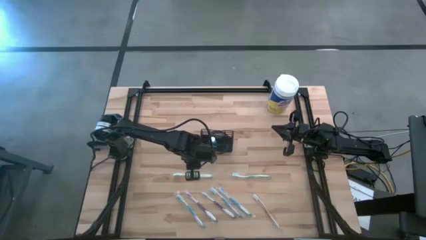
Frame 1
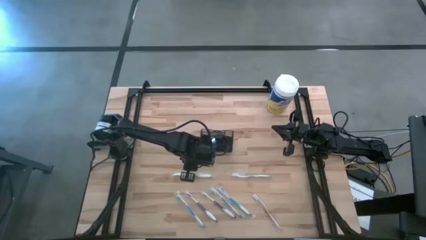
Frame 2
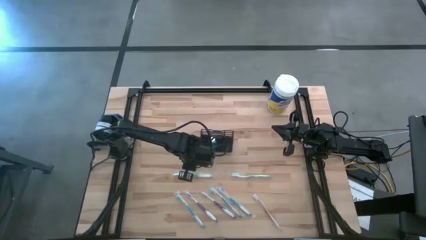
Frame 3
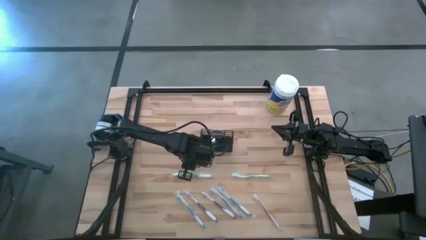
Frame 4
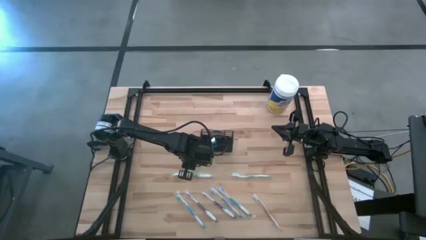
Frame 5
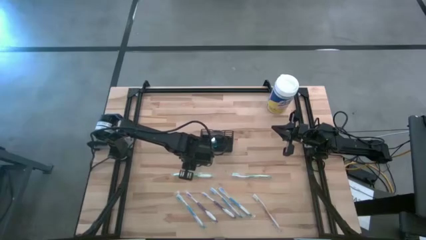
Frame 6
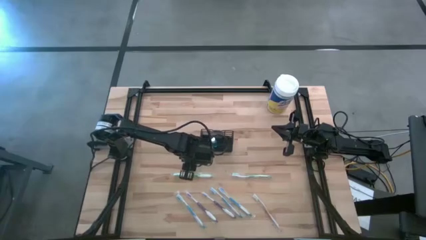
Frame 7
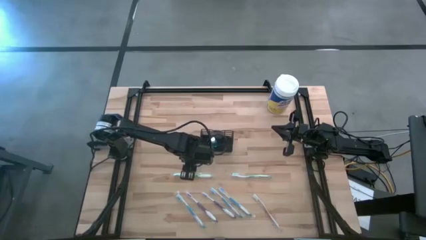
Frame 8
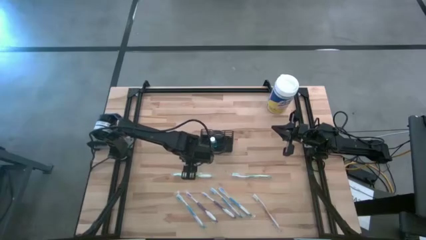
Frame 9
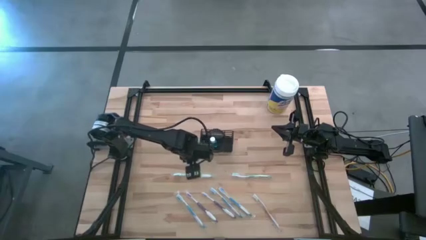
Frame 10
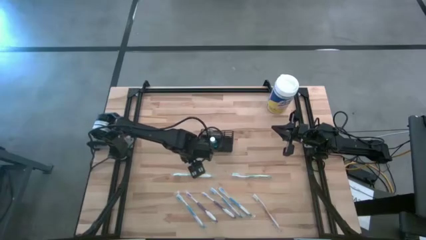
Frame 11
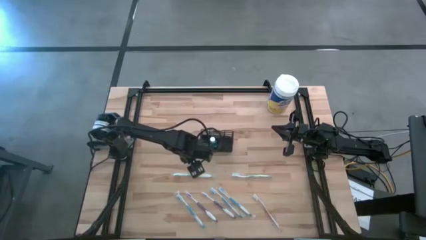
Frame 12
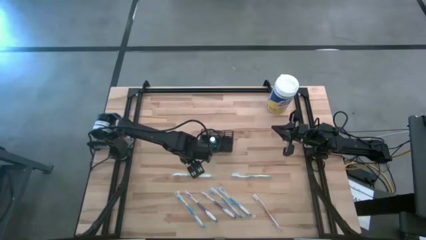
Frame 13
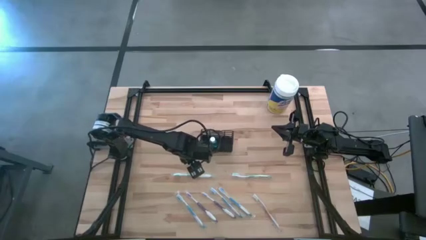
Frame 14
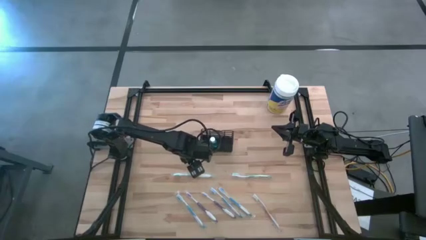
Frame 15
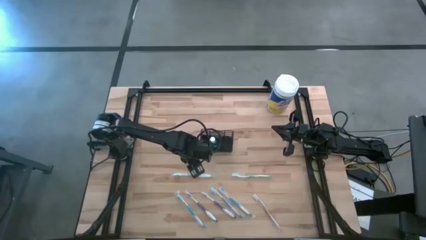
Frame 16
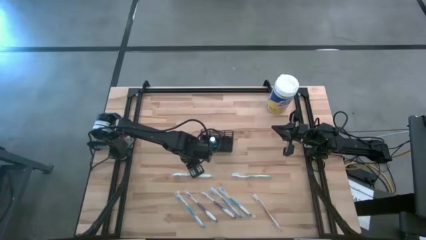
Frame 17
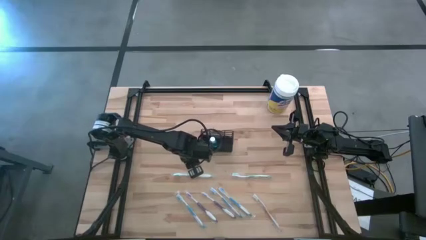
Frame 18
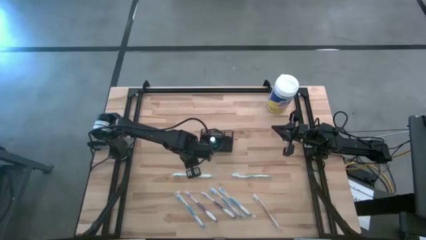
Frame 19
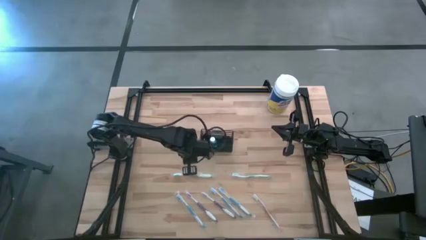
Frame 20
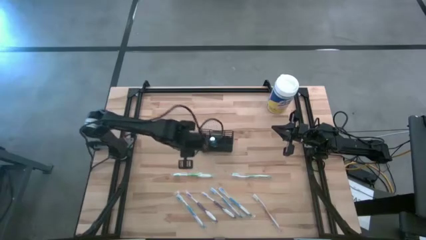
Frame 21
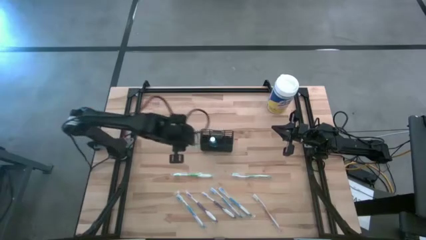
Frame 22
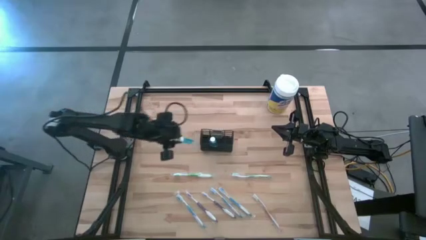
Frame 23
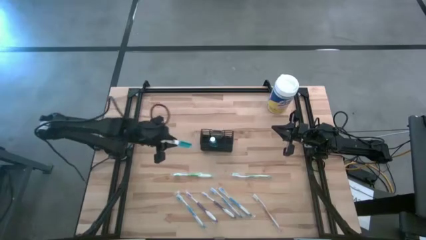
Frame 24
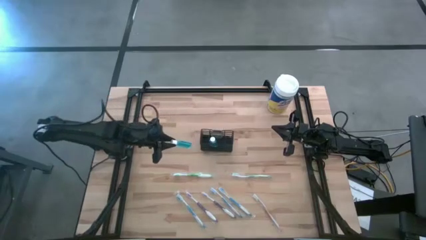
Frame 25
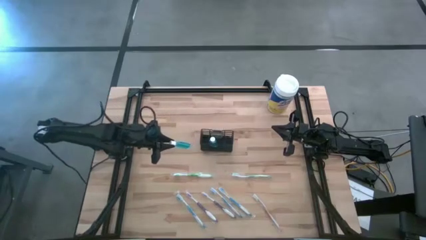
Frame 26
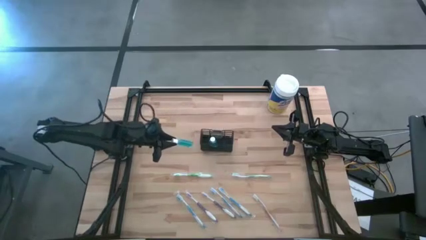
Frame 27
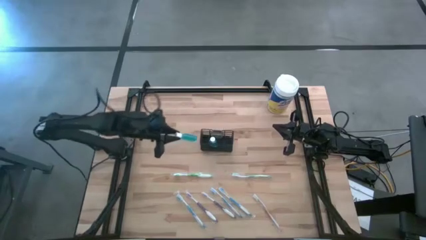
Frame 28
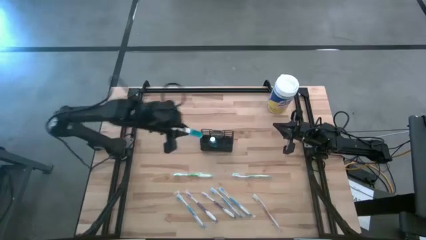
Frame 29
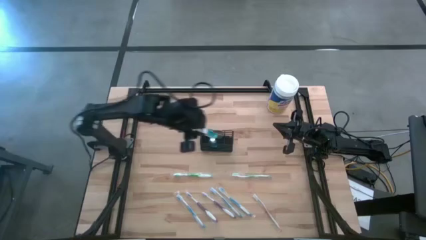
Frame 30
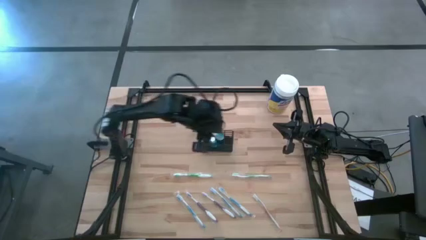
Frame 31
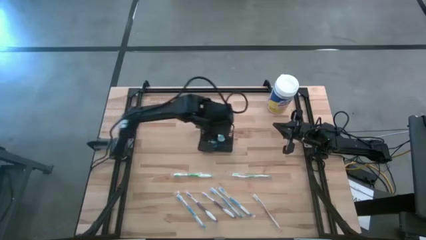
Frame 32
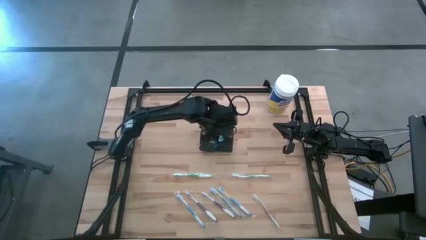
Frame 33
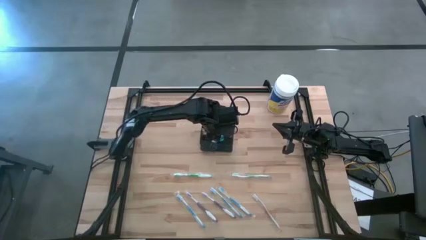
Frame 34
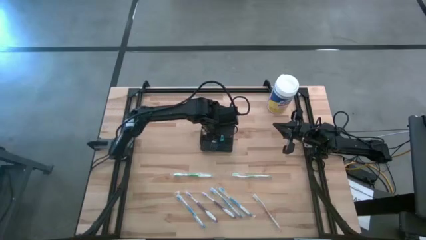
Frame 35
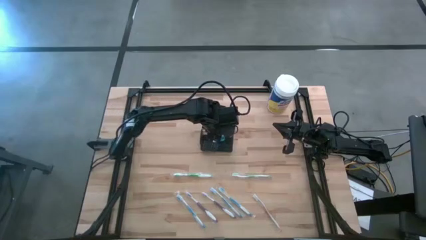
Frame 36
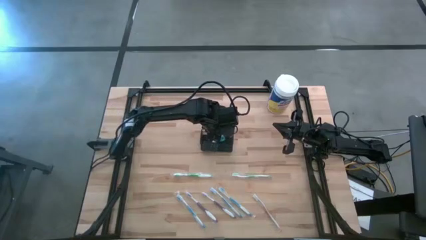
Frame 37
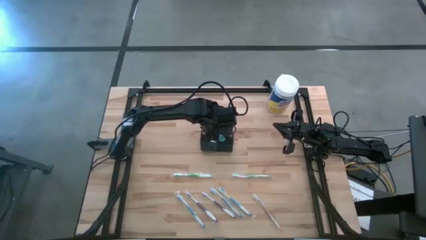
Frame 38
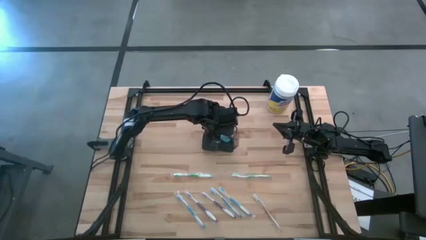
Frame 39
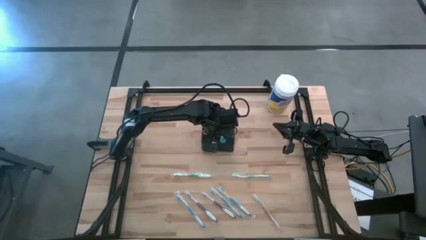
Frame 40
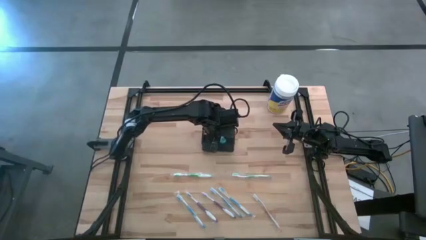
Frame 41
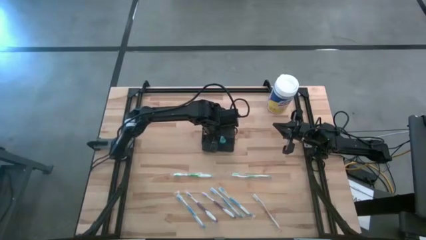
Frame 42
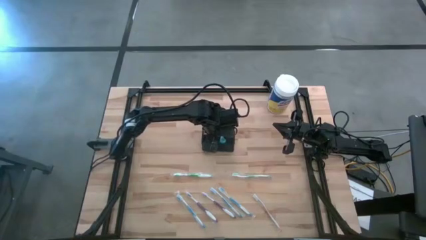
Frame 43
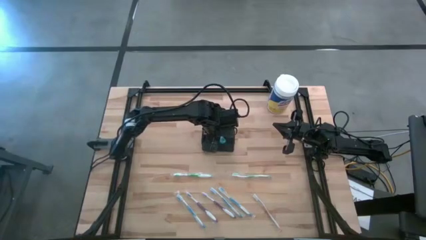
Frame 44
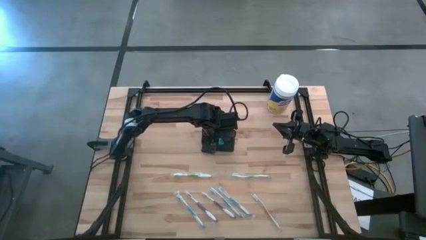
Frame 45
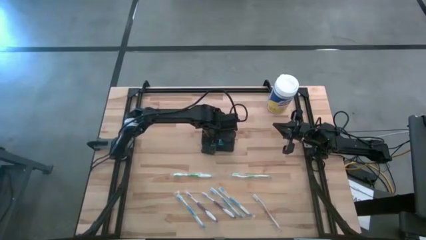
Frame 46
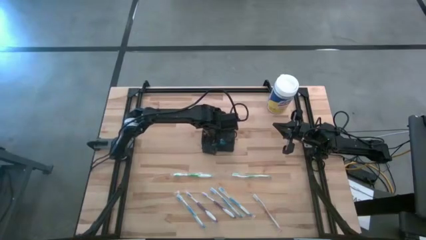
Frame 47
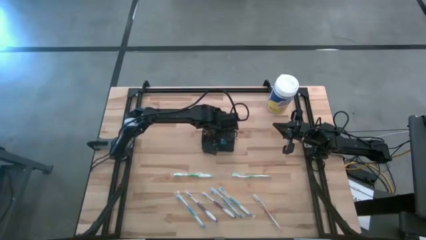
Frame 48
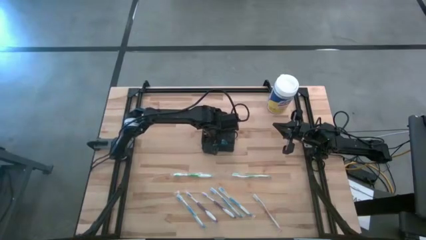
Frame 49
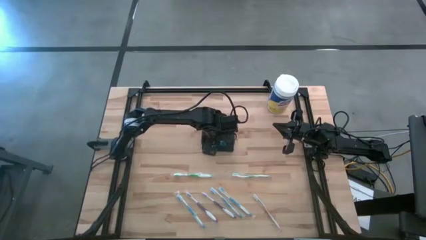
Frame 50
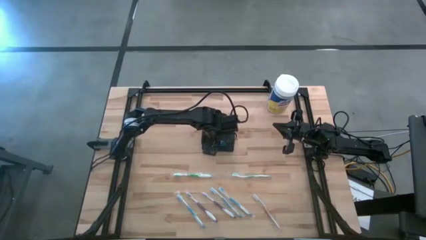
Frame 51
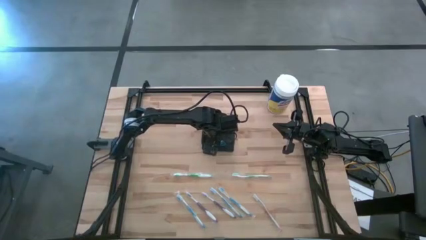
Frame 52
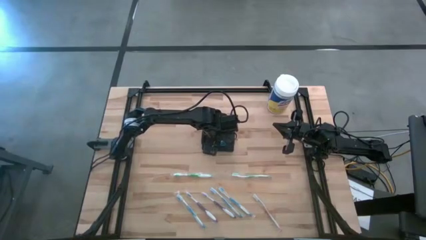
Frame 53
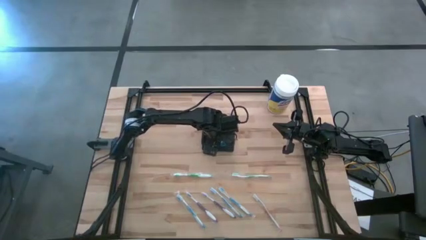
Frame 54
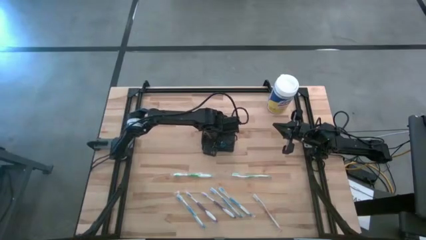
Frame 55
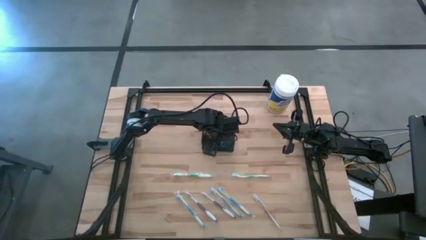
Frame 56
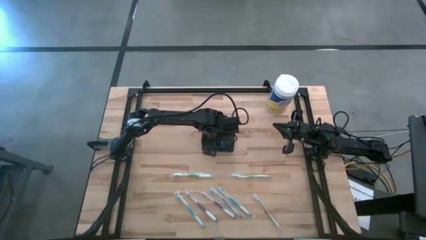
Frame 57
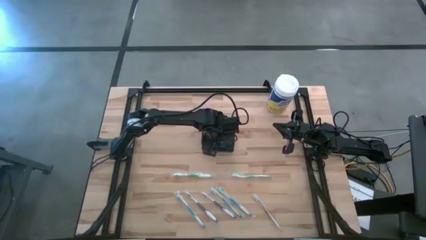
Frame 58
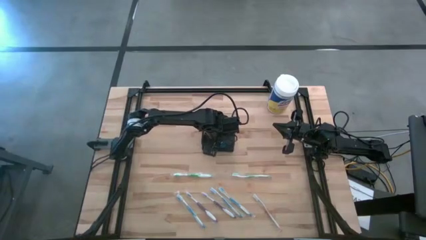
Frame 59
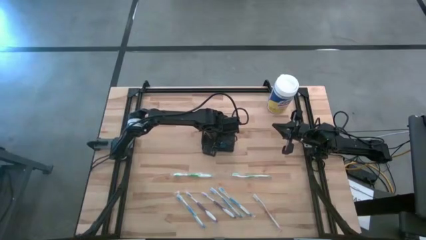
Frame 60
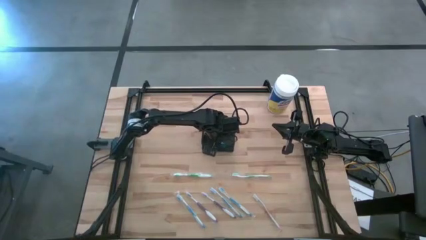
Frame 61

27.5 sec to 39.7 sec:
Task: Pick & Place toothbrushing station
Put the mouthwash into the wire organizer

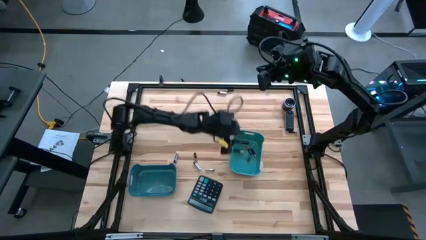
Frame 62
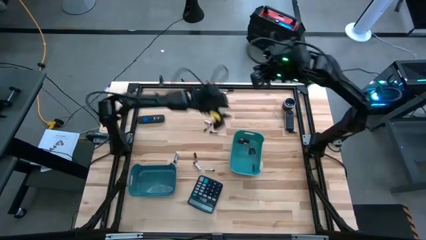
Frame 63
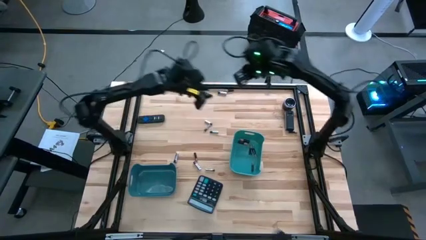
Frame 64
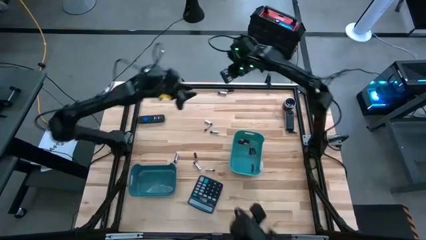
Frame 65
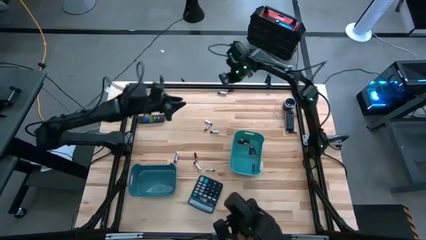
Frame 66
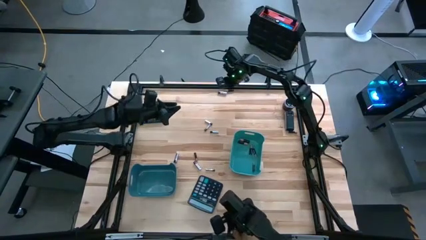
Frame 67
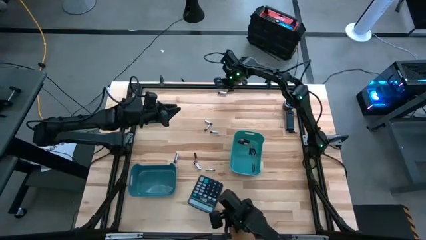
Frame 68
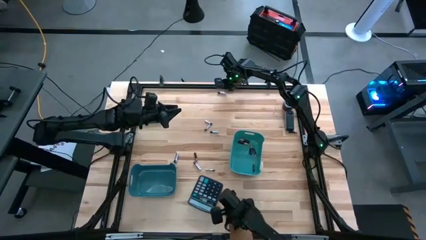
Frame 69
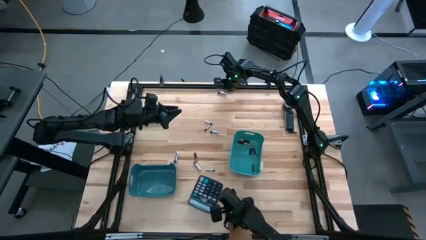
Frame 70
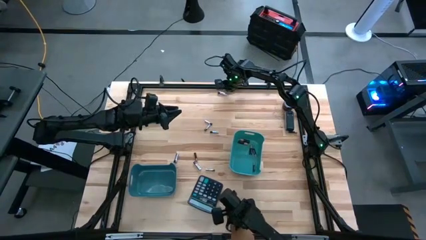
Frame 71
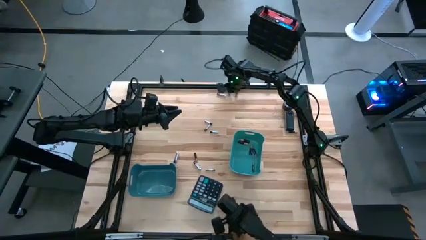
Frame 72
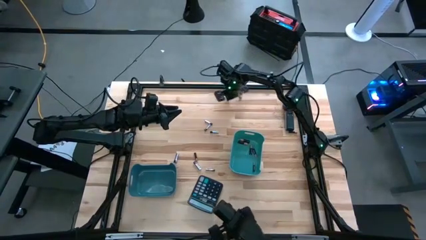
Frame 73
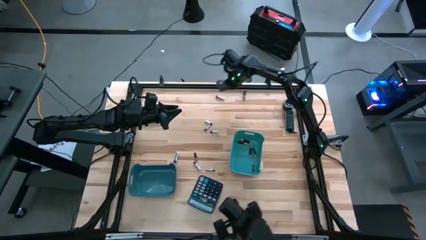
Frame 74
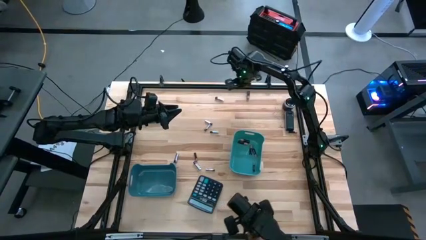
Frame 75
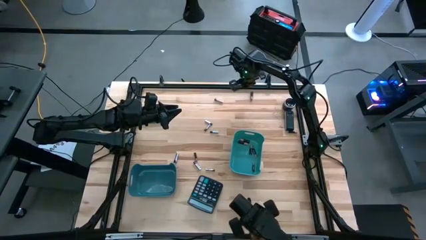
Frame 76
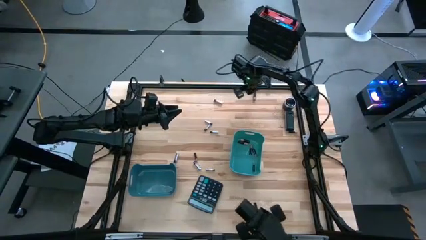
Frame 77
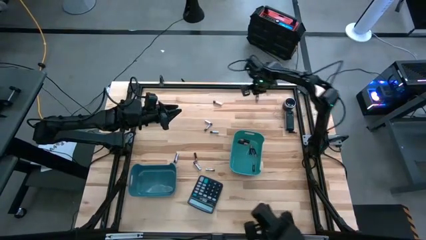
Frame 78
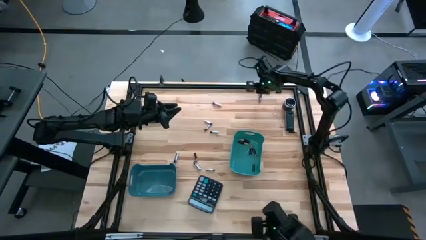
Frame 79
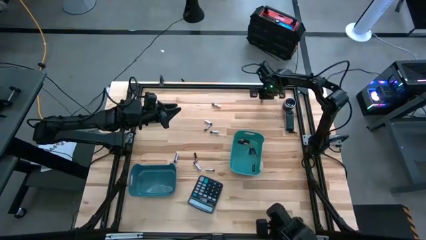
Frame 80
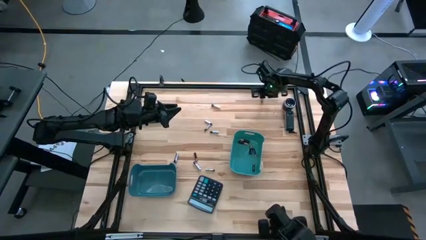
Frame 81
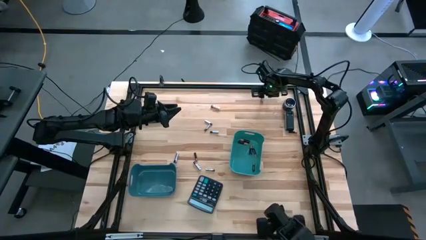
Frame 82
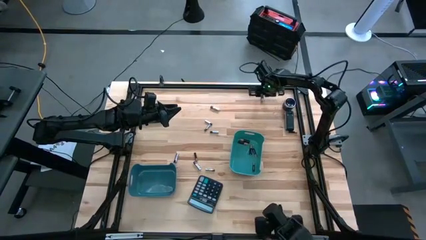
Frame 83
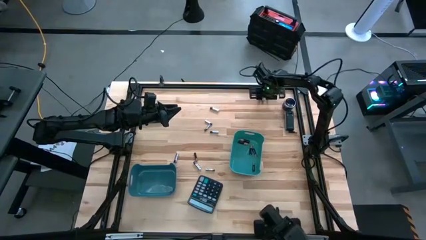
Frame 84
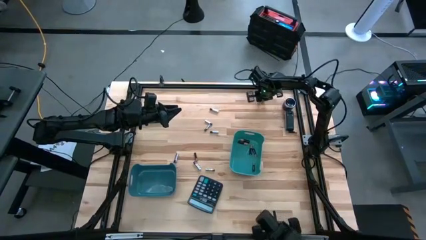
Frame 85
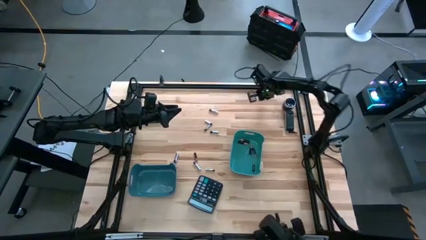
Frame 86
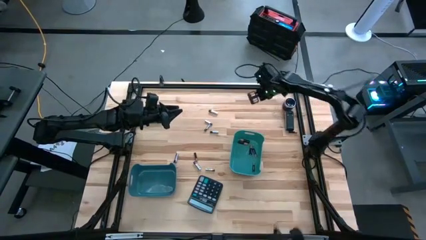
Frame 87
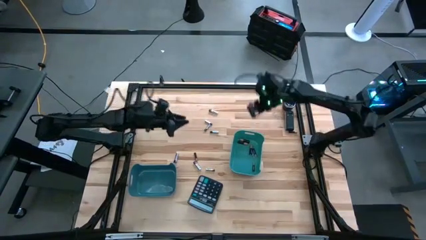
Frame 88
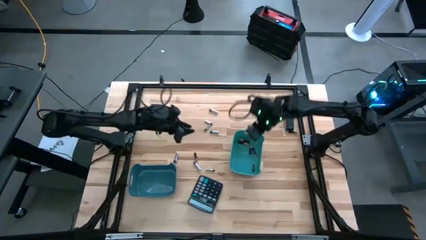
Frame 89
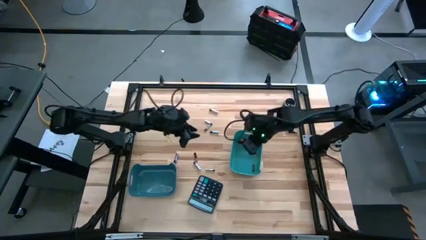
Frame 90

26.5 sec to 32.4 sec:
Task: Sort batteries
Put the black battery into the dark green bin
